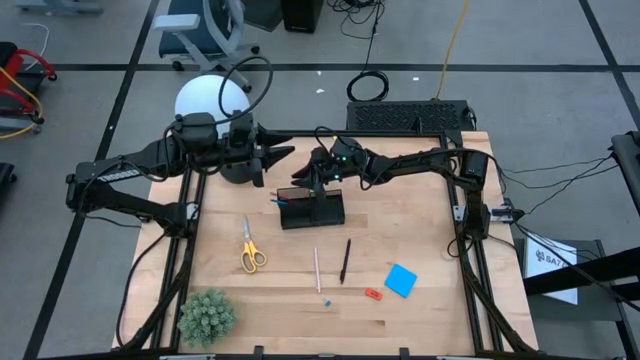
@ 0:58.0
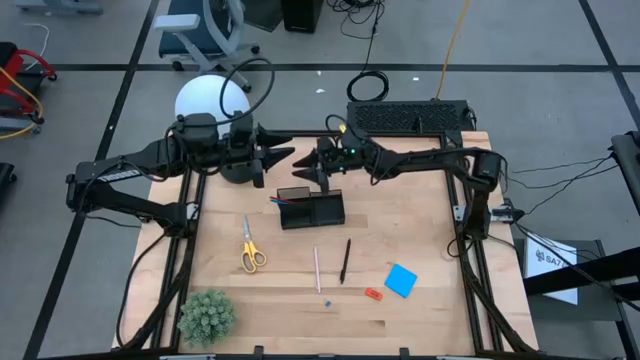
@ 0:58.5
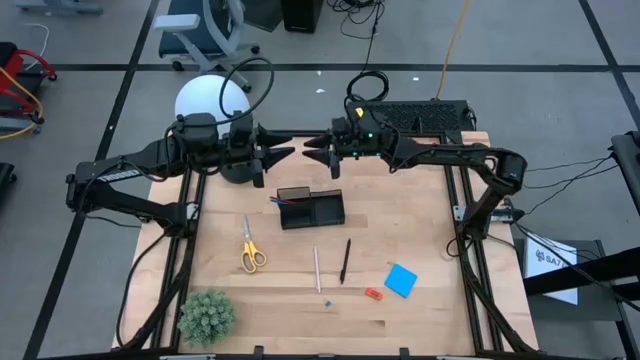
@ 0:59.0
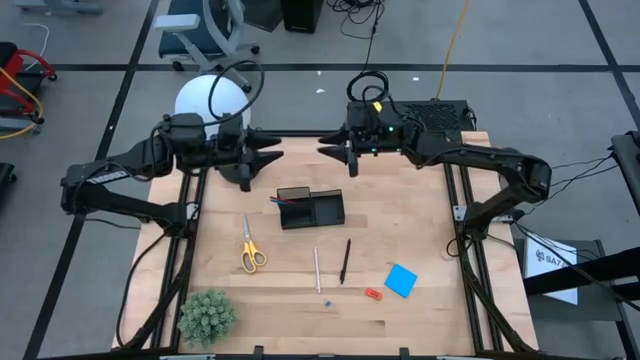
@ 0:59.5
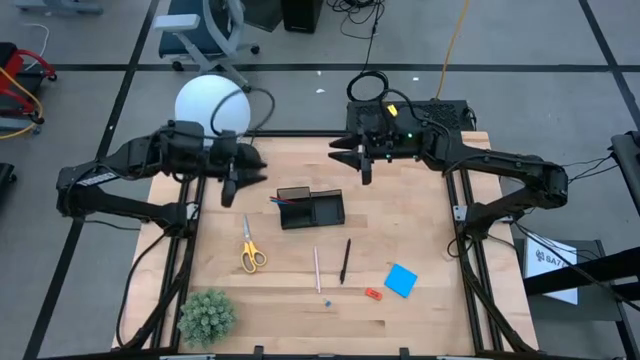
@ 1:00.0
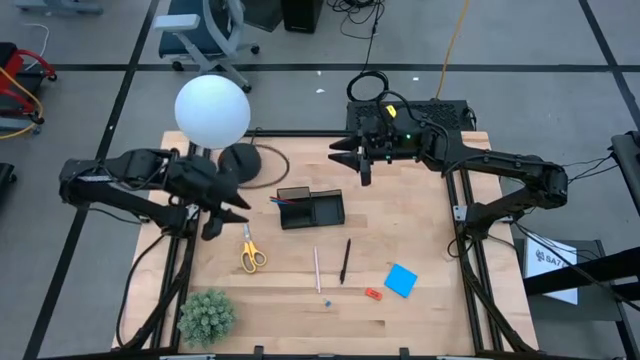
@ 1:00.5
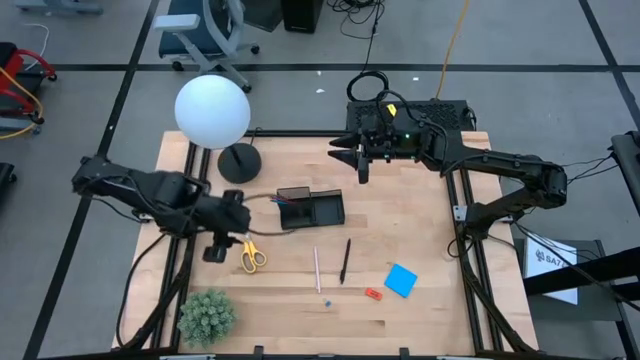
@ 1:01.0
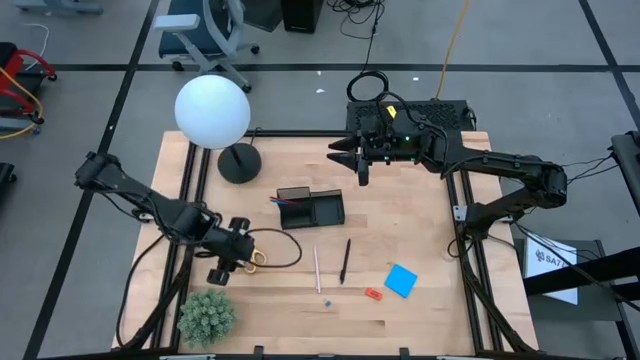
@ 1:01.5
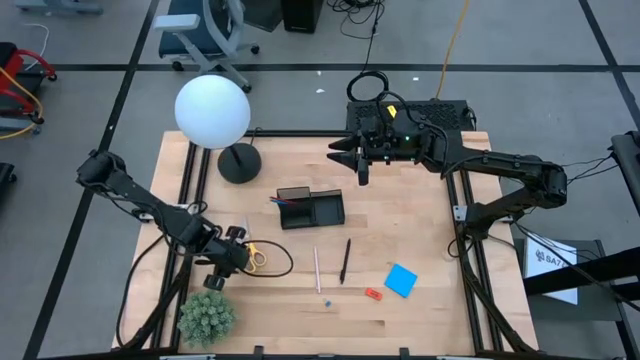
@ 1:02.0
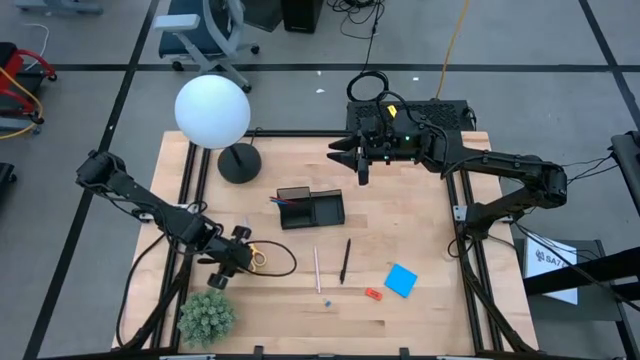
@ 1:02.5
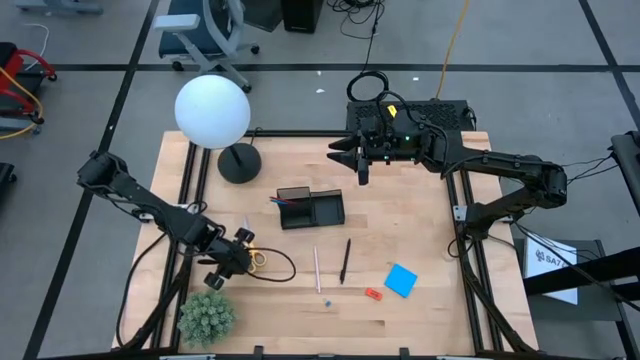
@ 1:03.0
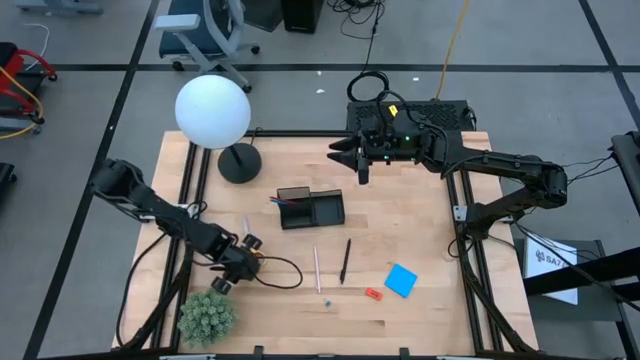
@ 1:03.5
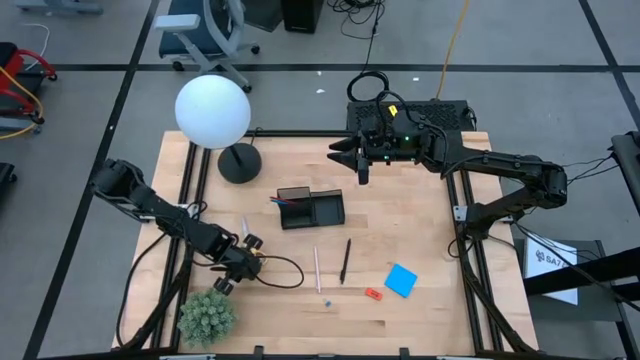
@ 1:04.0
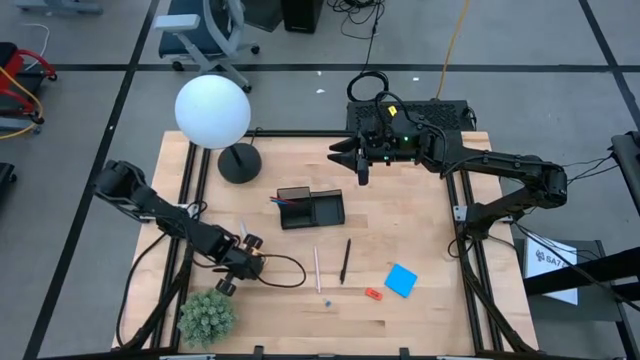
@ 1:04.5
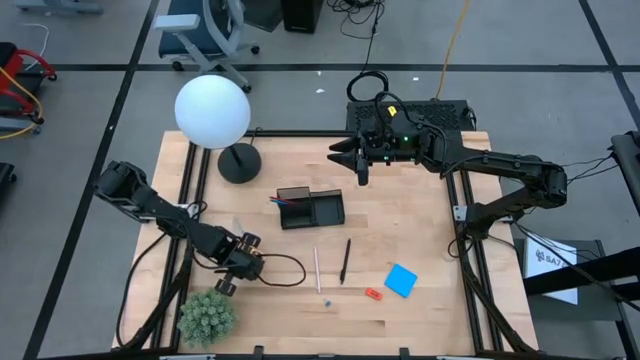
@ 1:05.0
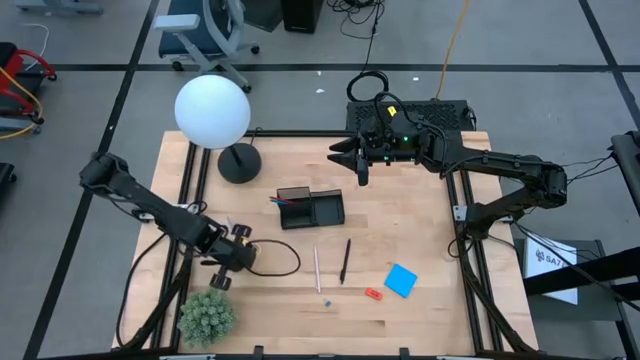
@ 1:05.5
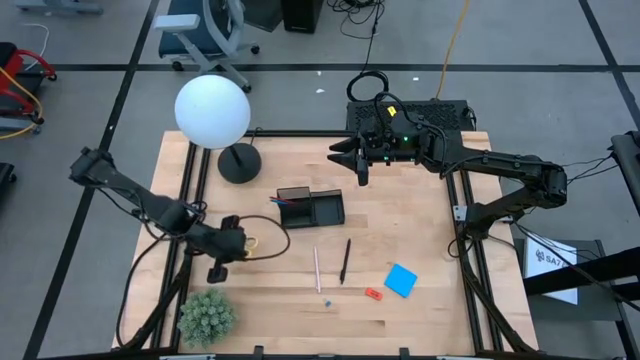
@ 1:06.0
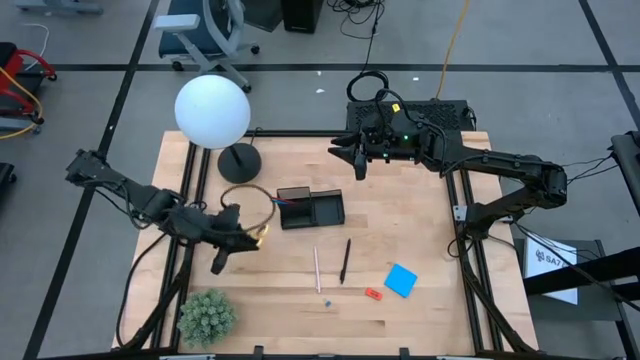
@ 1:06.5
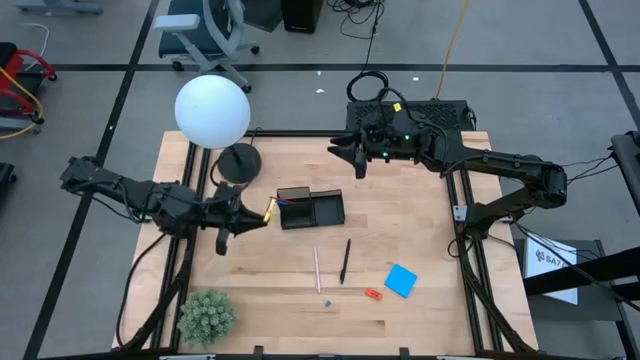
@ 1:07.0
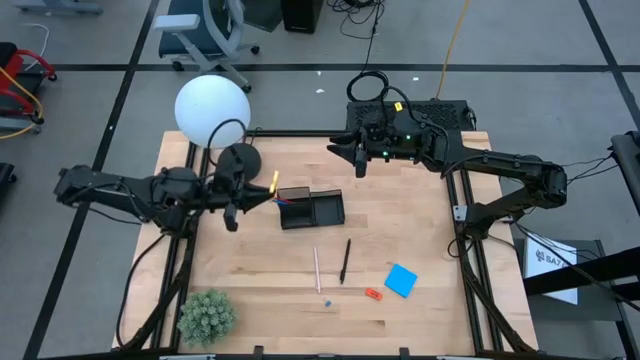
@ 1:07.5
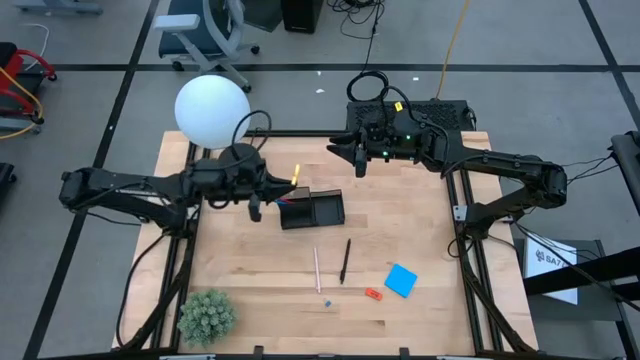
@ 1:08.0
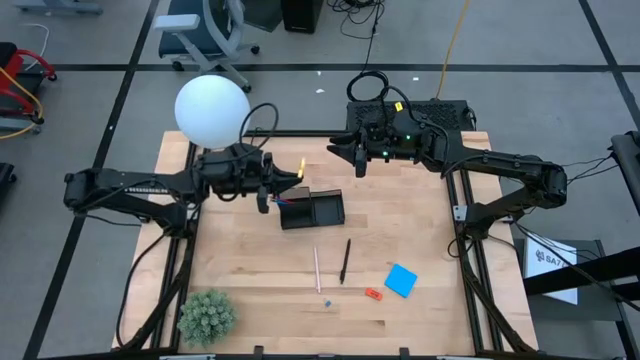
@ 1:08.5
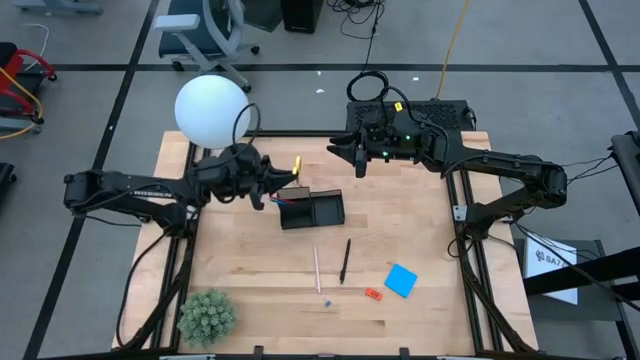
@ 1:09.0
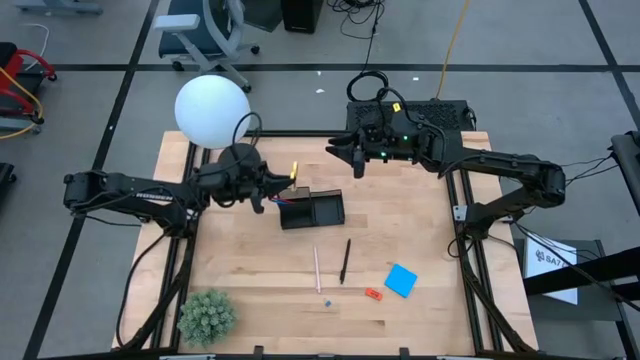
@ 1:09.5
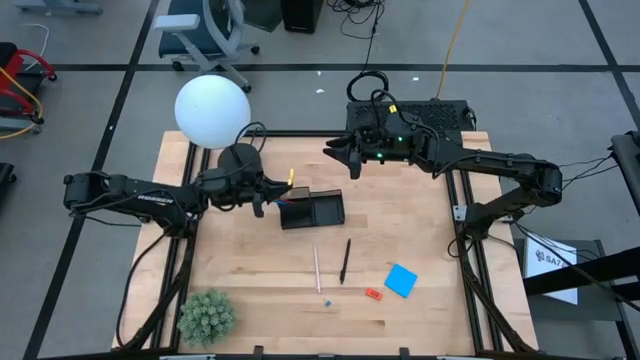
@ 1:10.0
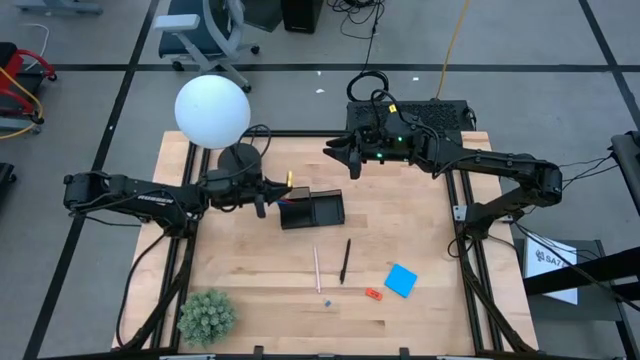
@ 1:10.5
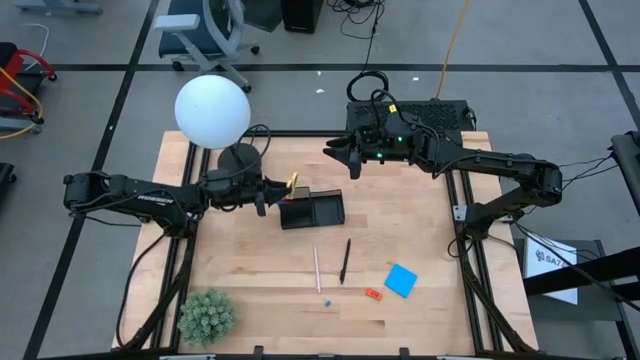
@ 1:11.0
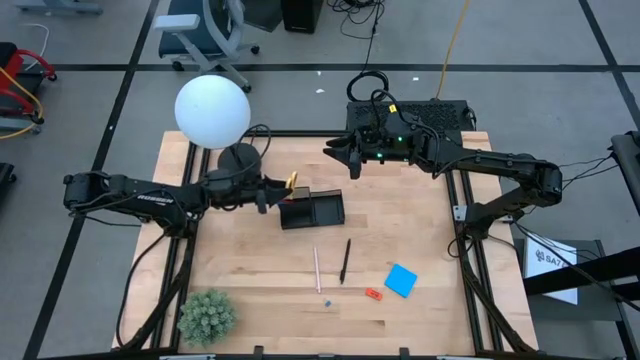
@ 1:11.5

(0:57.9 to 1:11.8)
Task: Pick and place office supplies into organizer
Put the yellow scissors into the black organizer
